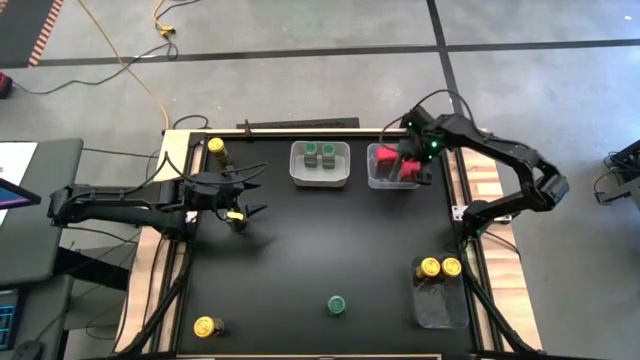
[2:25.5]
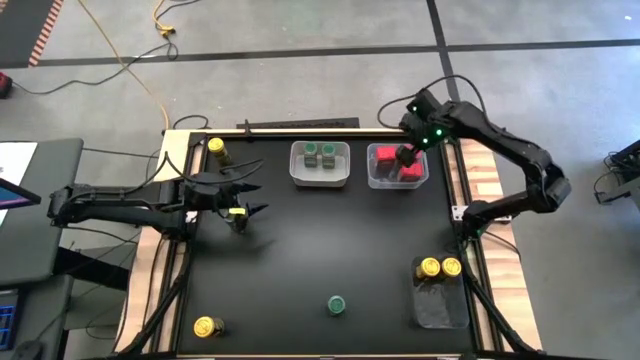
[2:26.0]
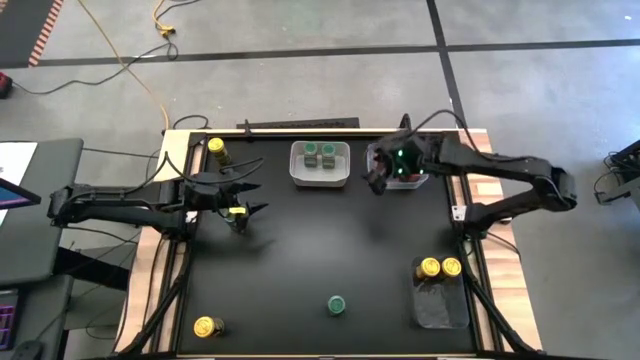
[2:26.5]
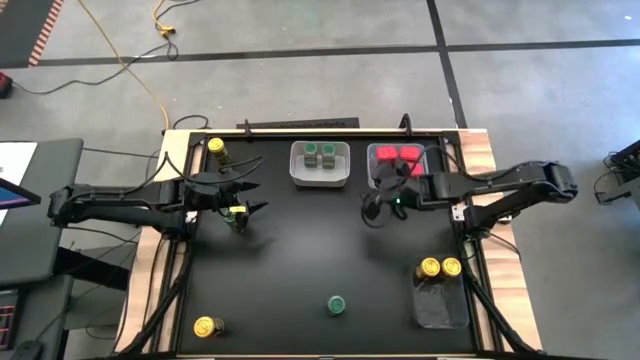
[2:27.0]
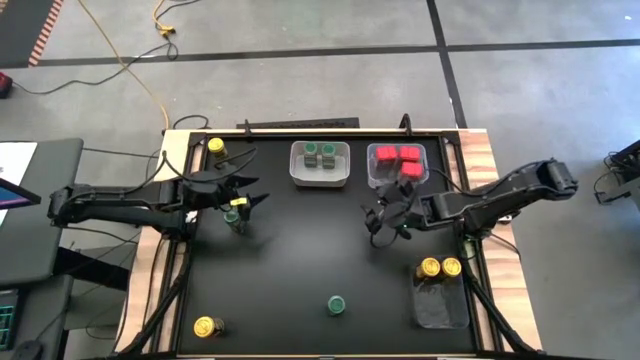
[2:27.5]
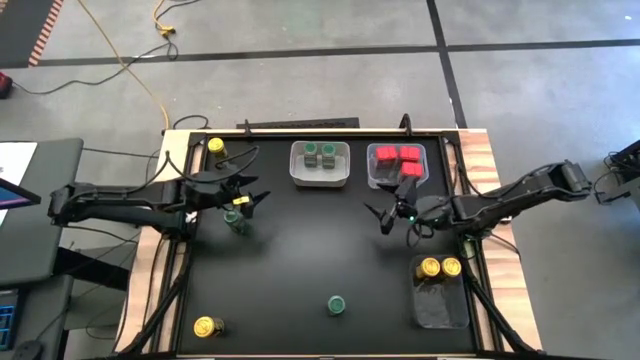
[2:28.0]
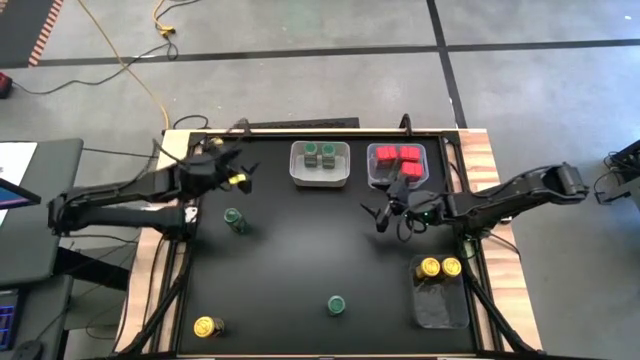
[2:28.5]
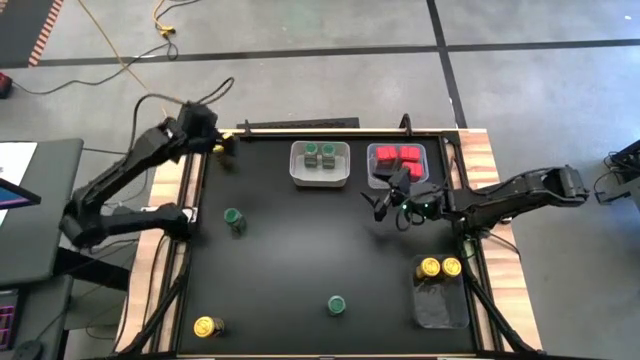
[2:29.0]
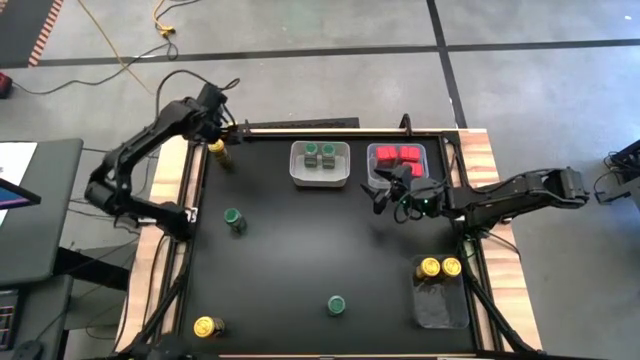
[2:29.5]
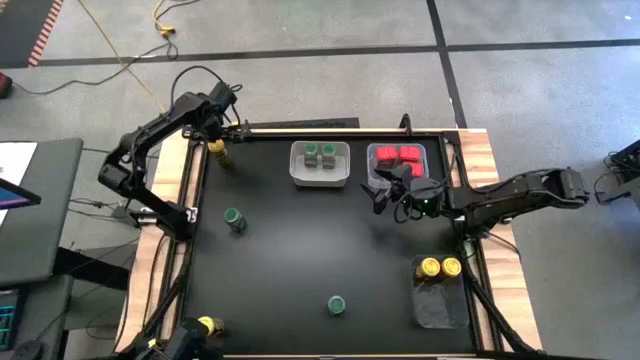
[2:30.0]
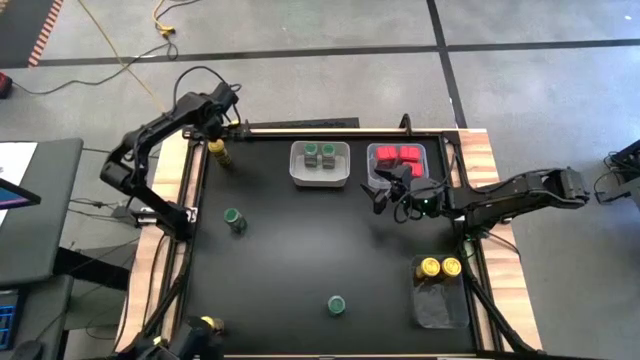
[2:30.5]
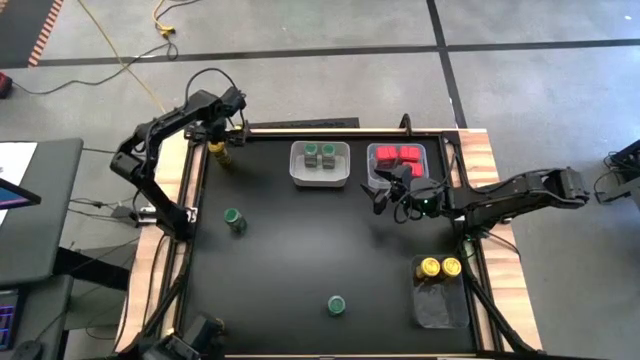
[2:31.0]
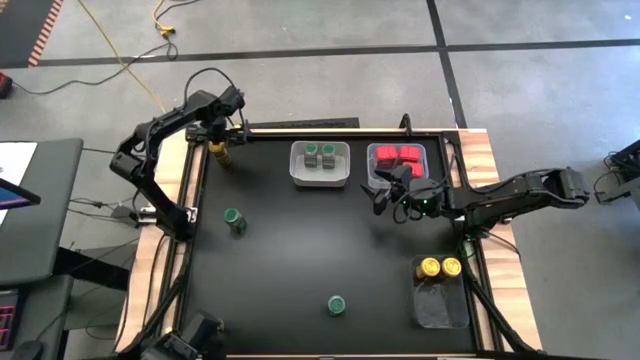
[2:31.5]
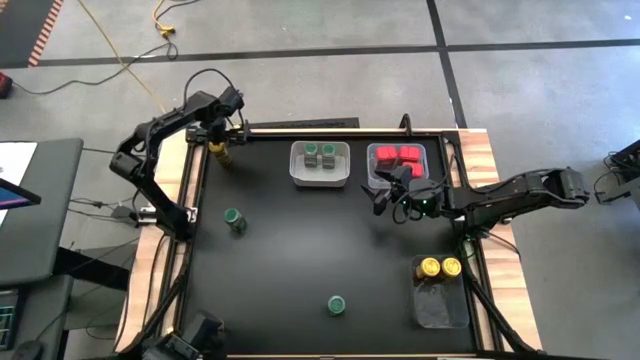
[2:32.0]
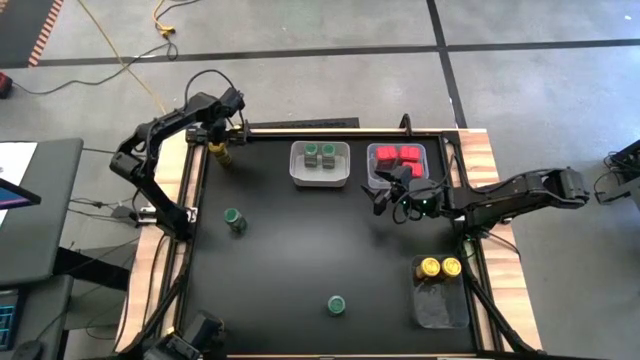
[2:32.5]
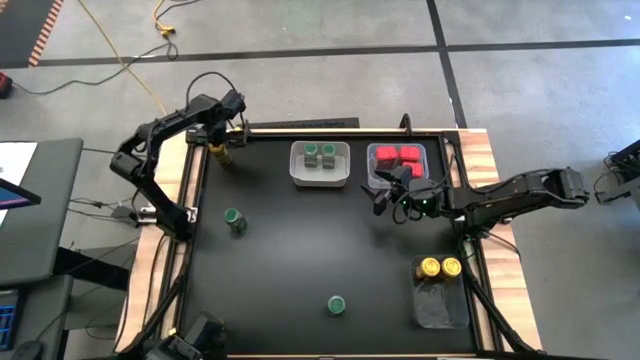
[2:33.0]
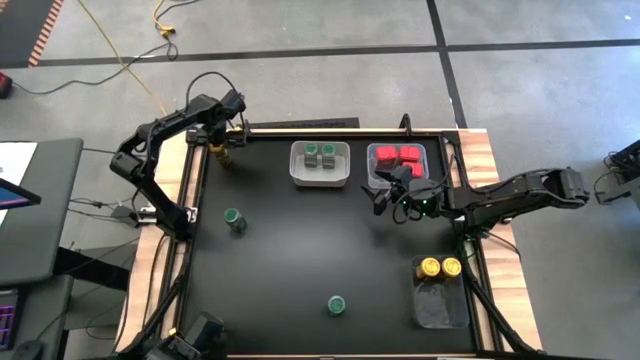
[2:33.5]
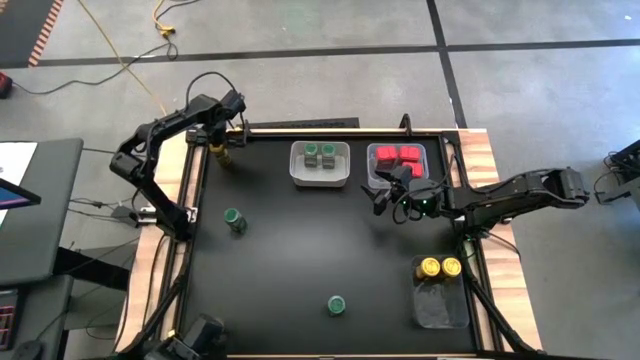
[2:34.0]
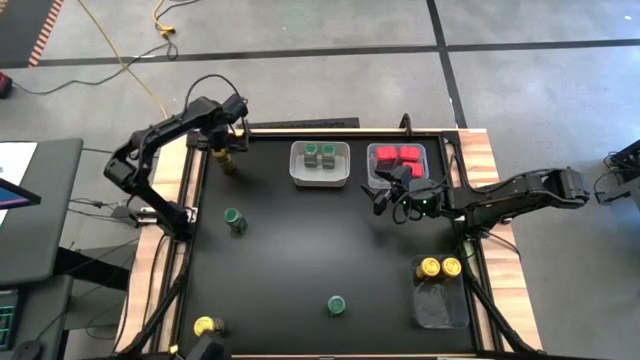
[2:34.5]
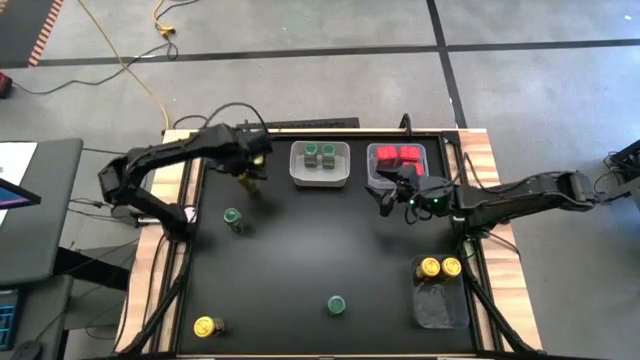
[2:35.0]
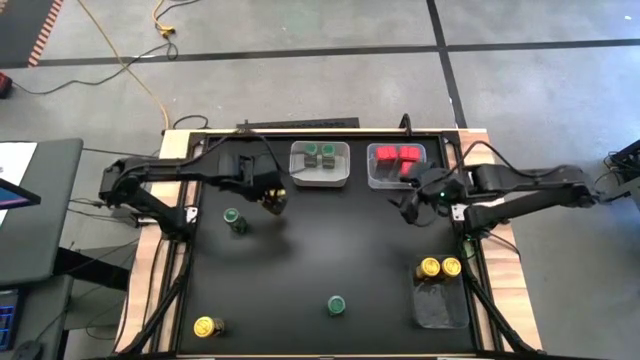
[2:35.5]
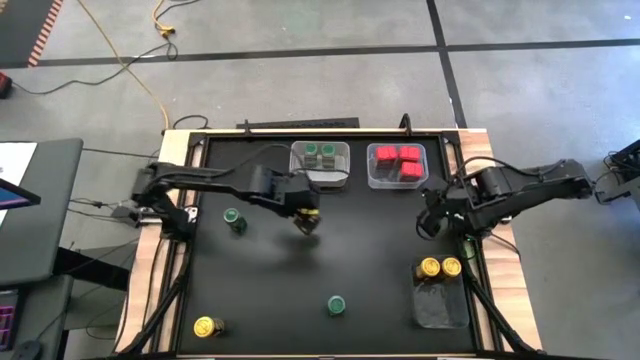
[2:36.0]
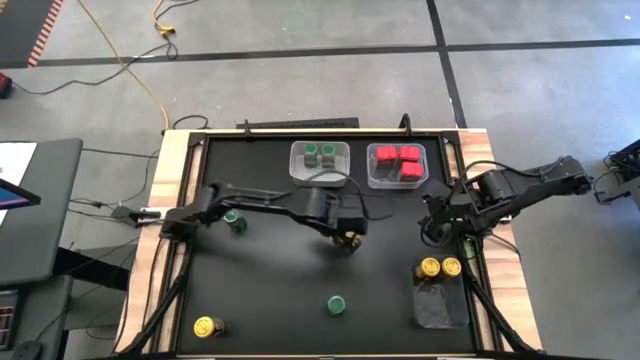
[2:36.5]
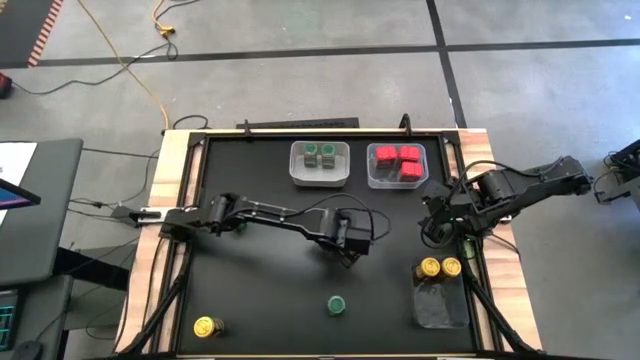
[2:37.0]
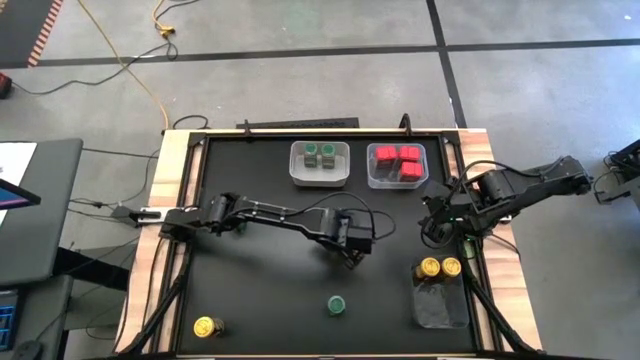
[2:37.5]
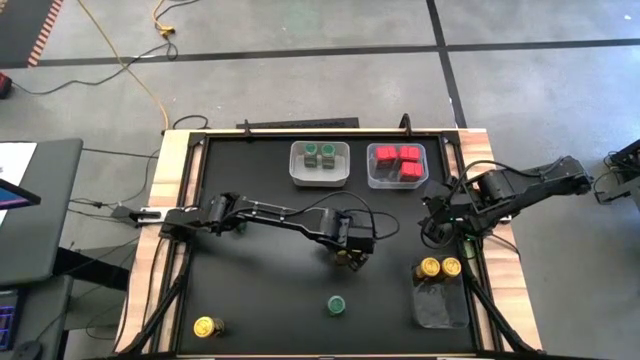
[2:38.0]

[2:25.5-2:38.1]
Task: Sort spices by type
Put the top yellow seasoning bottle into the black bin

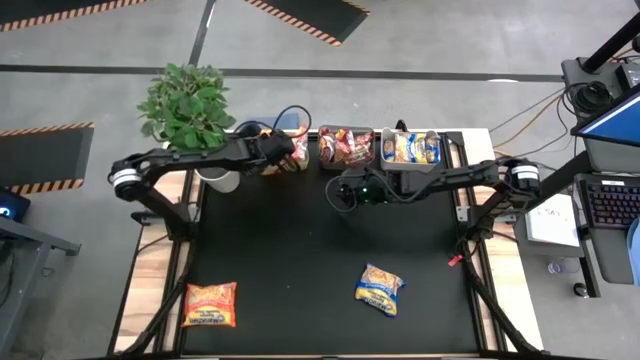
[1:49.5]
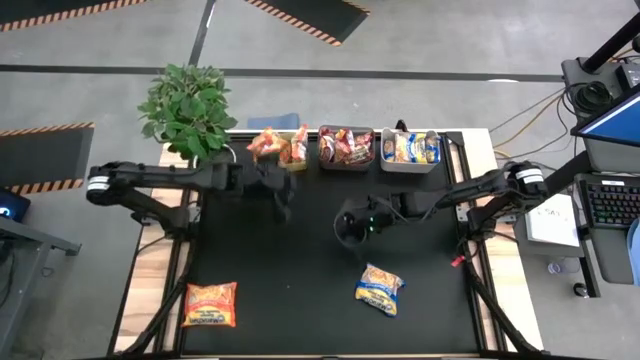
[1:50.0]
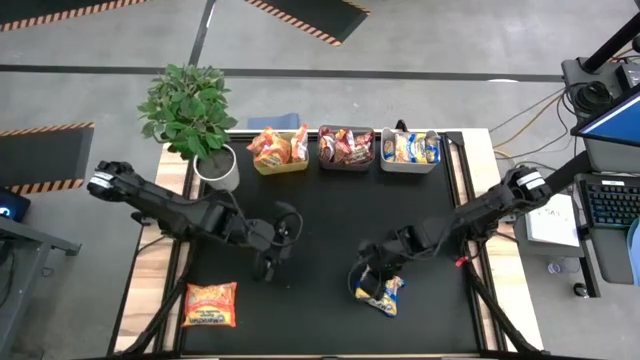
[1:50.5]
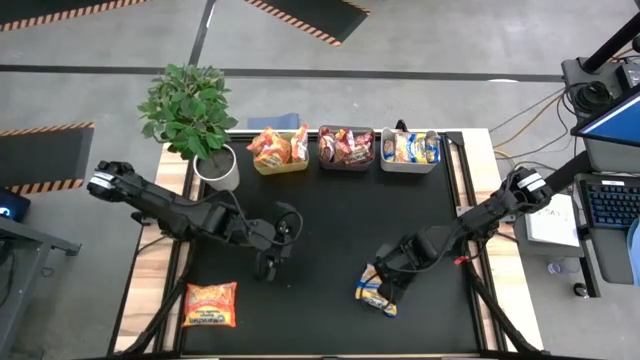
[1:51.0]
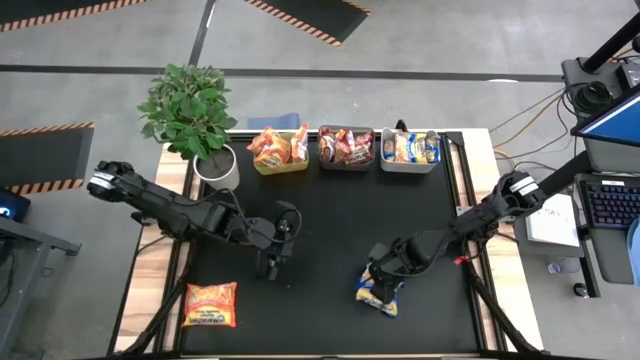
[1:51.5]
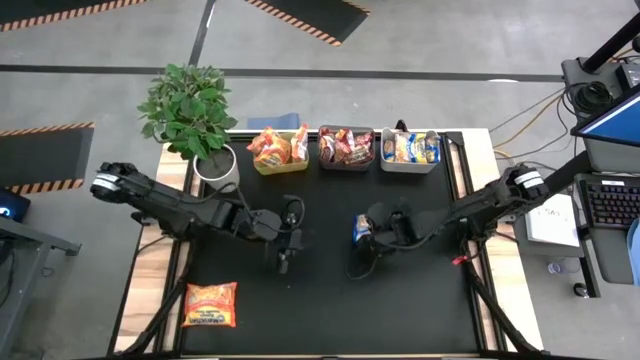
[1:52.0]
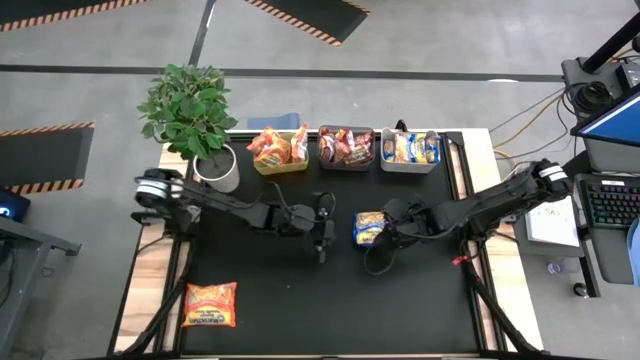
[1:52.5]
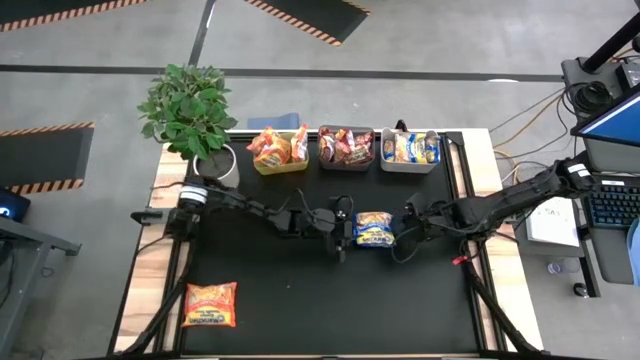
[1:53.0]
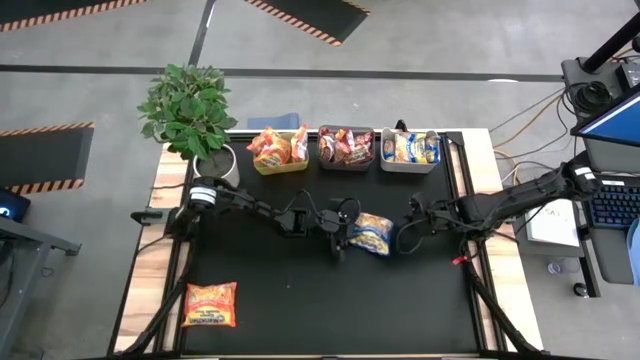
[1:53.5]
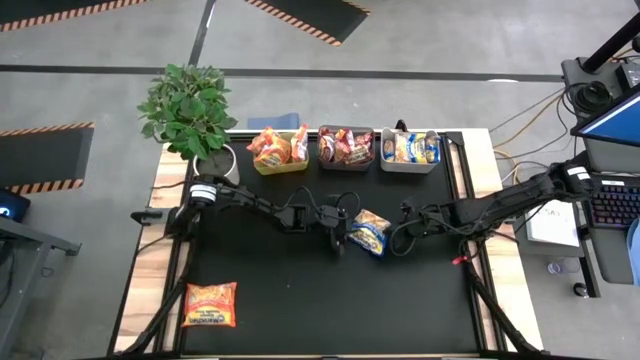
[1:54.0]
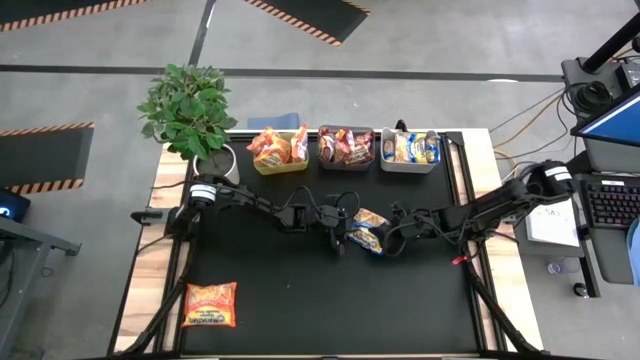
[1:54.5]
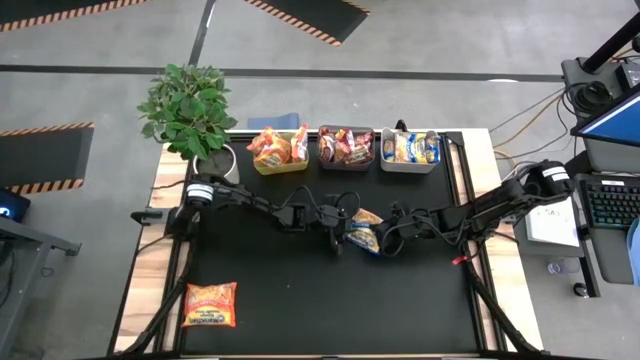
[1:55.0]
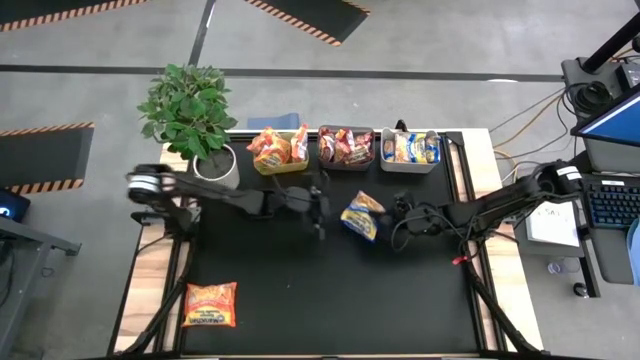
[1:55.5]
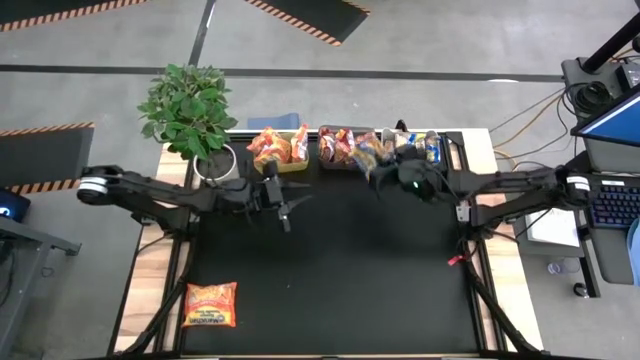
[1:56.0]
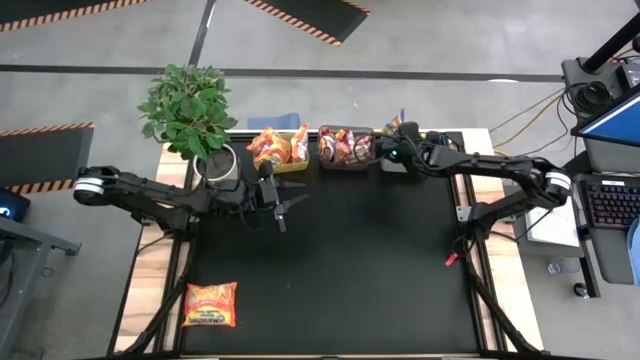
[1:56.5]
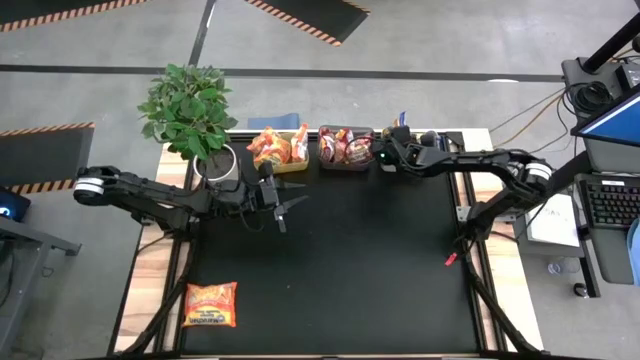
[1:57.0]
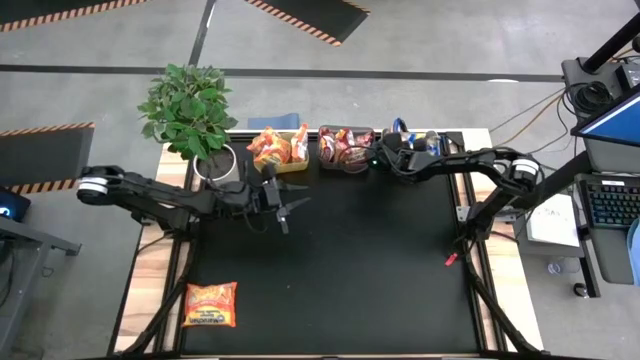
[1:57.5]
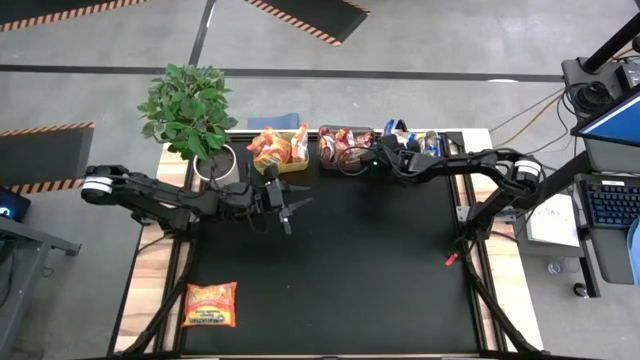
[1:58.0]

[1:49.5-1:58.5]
Task: Sort Maruchan noodles
Put the blue noodle pack into the white bin
